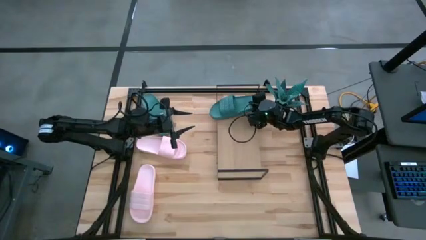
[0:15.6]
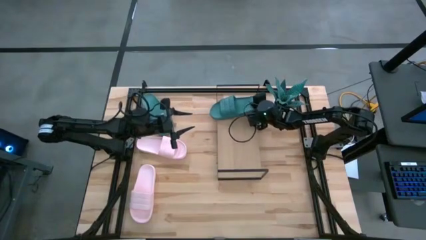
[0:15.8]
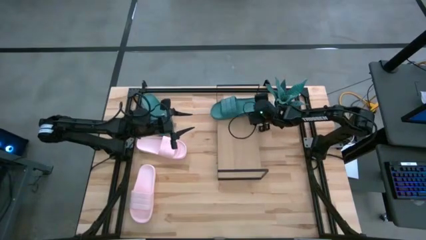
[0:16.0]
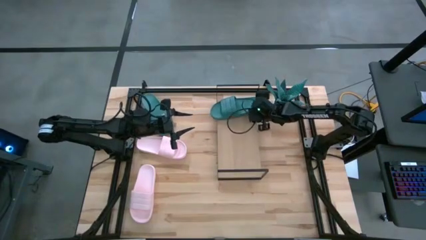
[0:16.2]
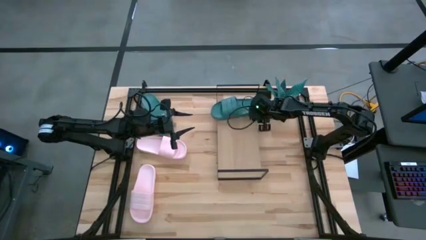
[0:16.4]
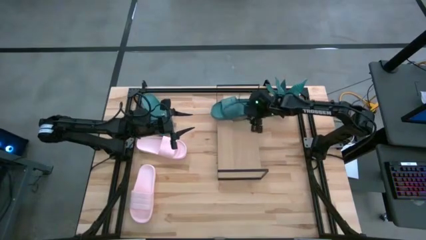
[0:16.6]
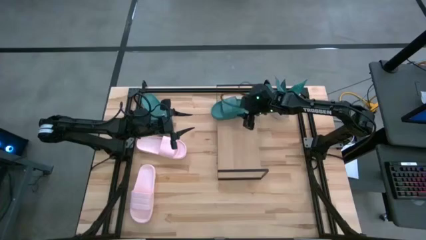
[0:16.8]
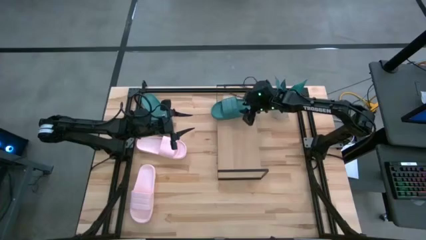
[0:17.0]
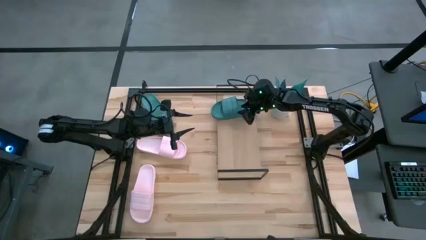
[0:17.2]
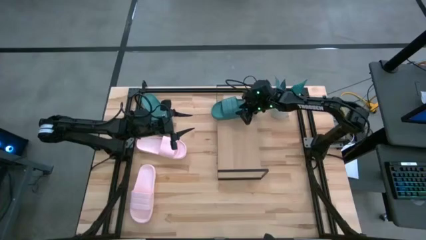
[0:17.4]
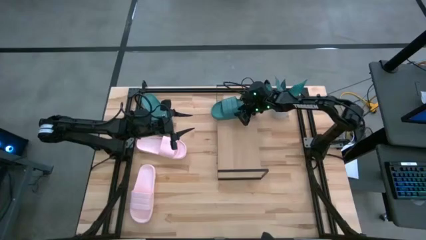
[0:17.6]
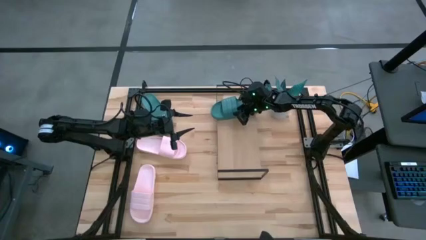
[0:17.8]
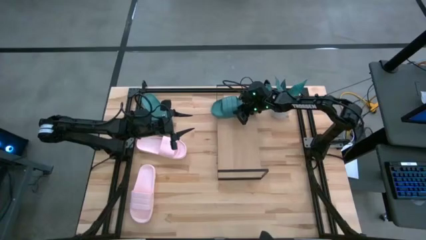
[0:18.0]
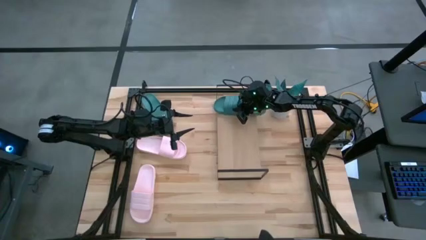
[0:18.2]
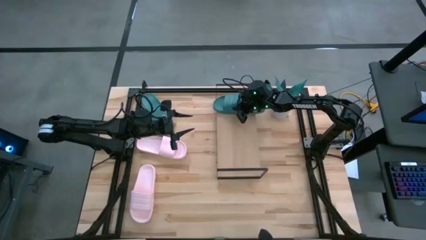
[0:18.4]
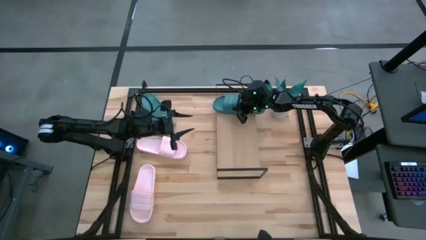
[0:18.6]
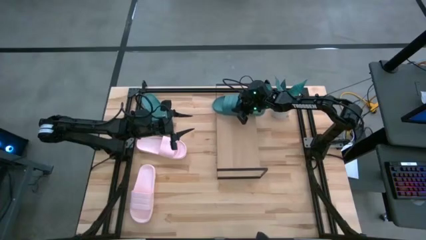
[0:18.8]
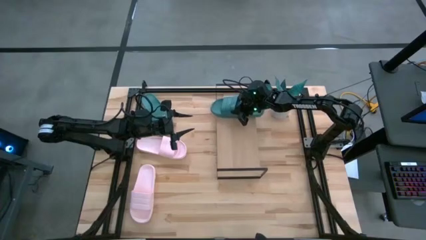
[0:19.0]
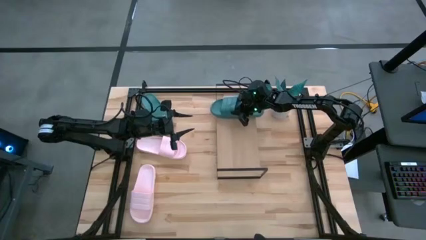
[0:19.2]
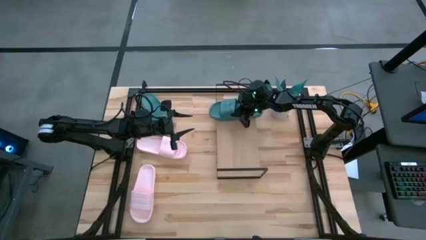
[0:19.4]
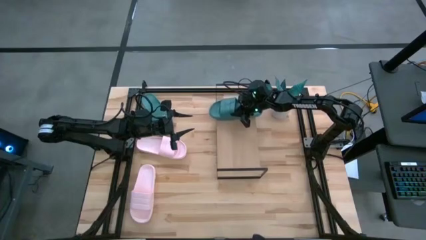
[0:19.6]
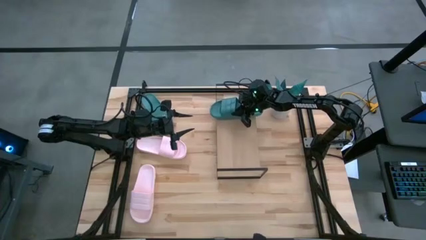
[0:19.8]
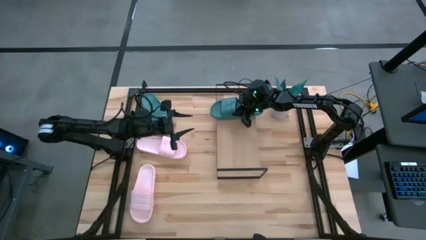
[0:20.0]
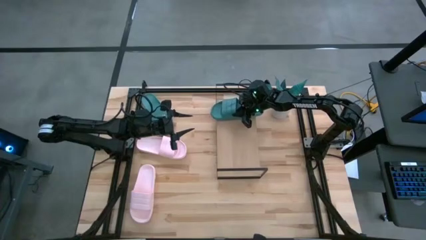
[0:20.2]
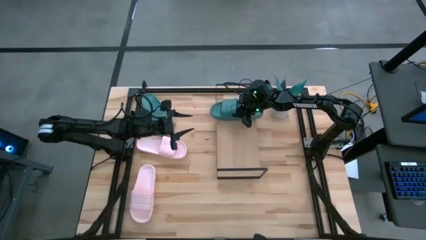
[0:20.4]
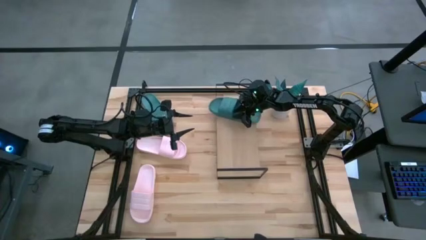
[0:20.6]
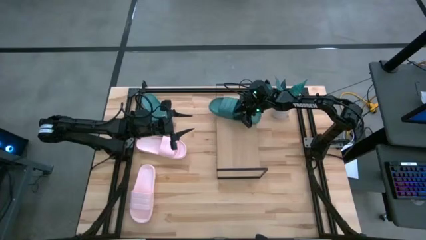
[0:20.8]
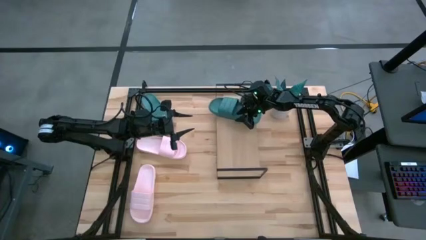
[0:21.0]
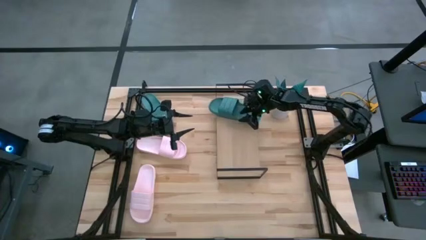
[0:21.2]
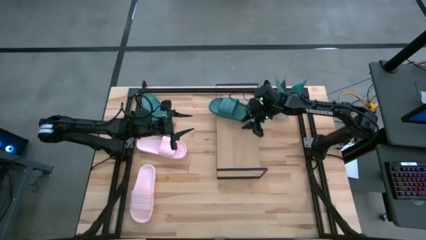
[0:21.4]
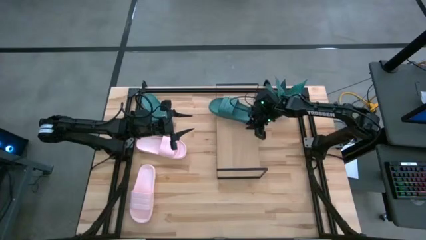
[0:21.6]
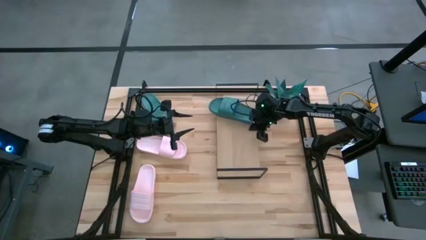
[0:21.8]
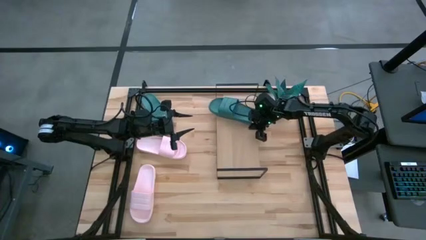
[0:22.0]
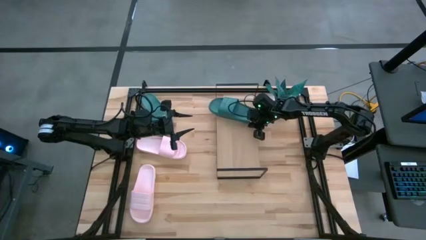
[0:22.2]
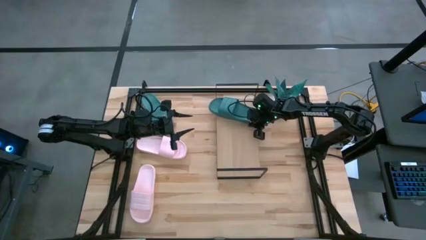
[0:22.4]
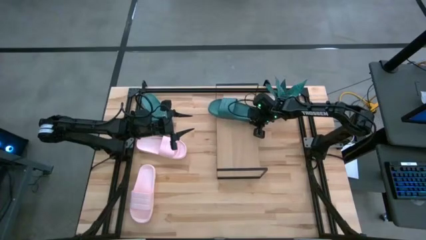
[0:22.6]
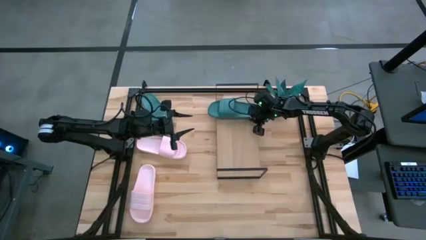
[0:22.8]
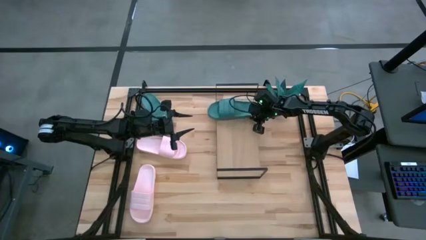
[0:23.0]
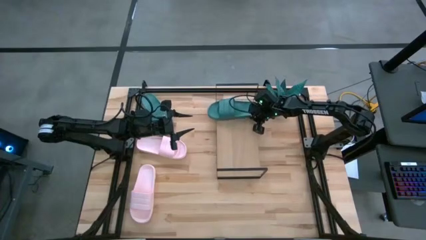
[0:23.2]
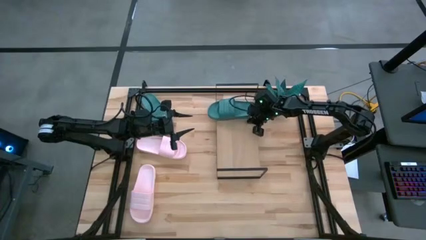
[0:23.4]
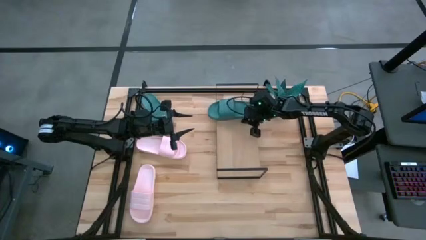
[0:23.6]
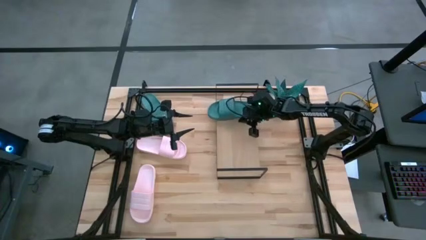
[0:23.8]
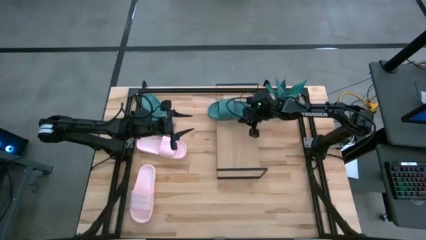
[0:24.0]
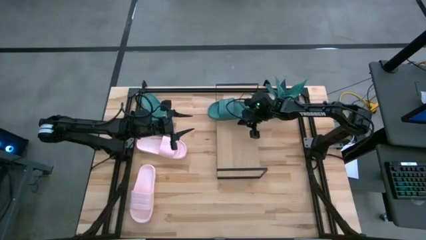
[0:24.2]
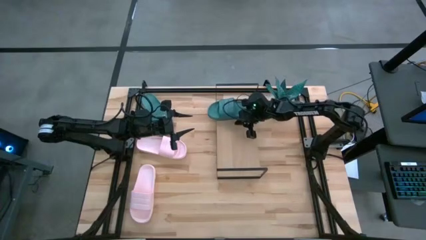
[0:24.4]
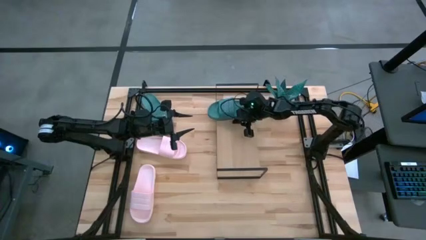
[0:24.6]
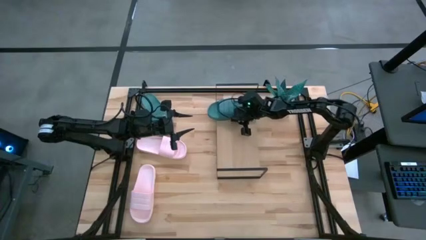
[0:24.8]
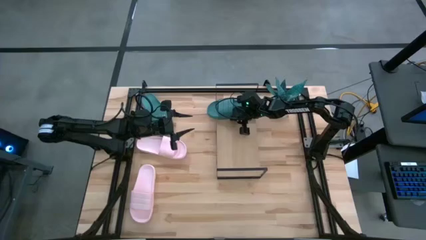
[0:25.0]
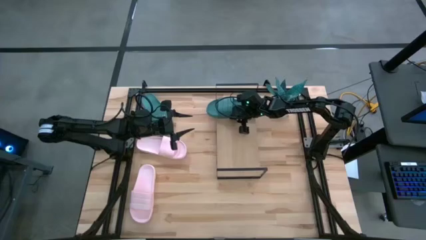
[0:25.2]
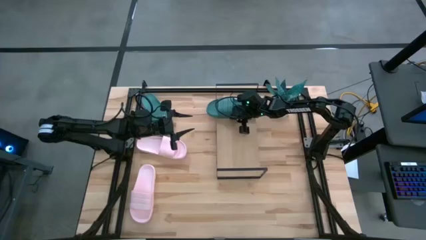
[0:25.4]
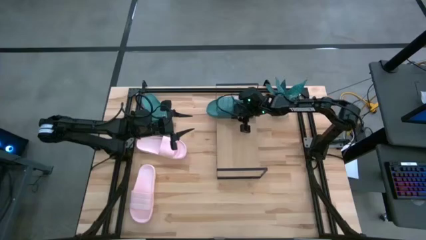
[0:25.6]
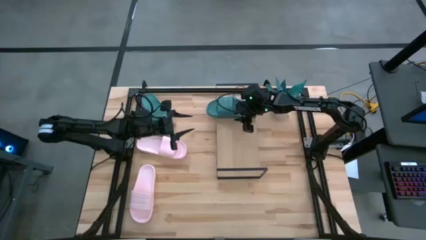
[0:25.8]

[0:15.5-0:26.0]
Task: Pick and place slides into the shelf
Put the right blue slide on the shelf

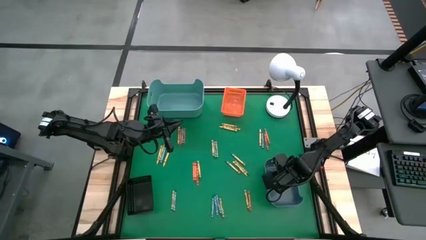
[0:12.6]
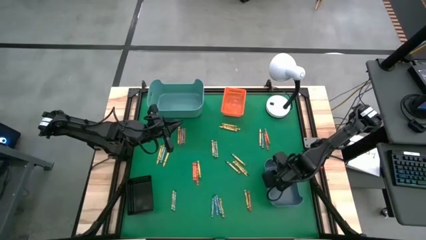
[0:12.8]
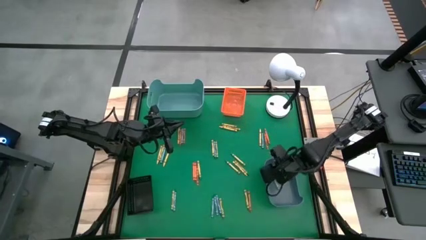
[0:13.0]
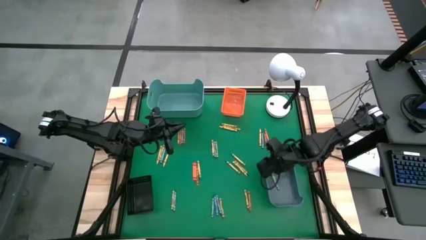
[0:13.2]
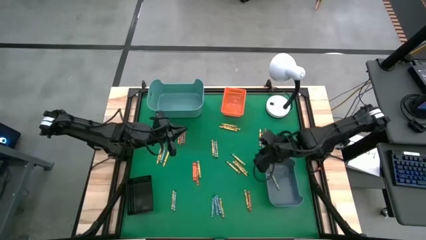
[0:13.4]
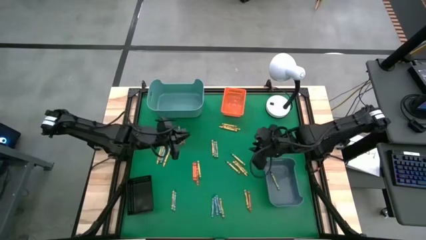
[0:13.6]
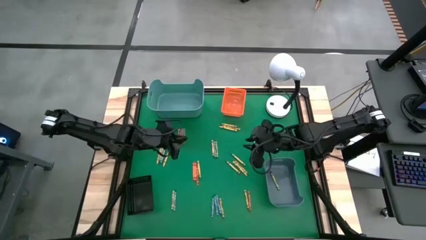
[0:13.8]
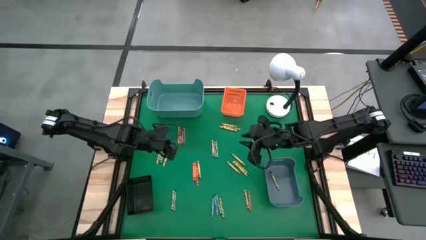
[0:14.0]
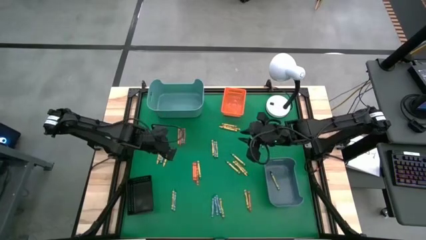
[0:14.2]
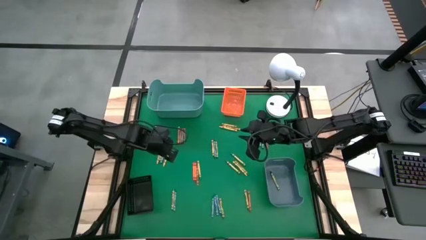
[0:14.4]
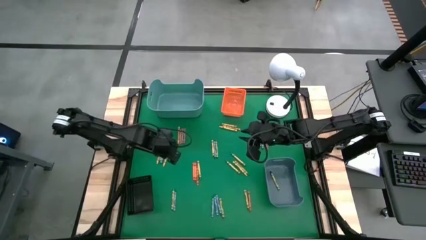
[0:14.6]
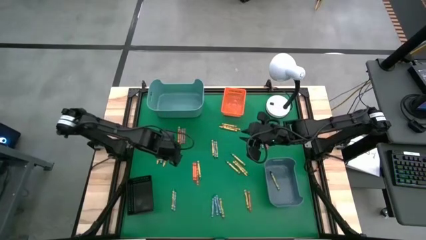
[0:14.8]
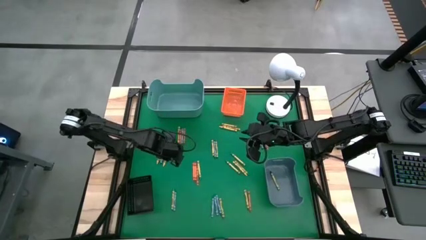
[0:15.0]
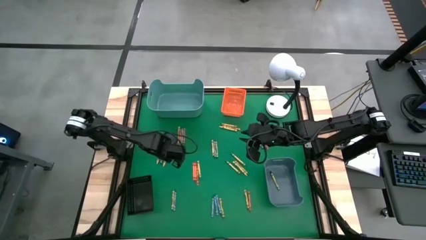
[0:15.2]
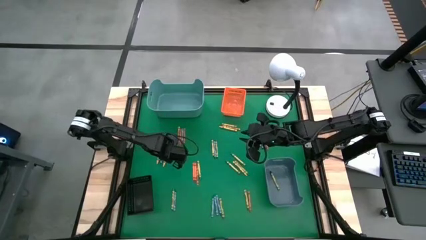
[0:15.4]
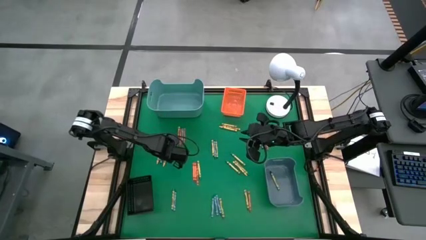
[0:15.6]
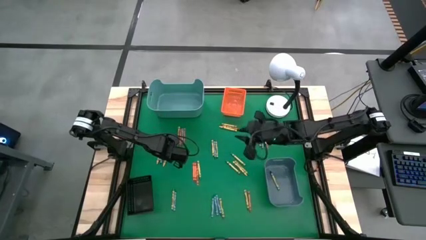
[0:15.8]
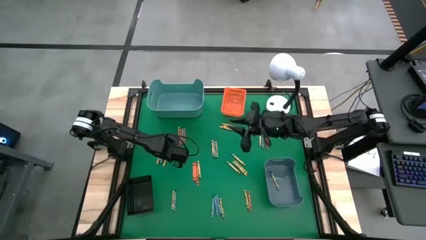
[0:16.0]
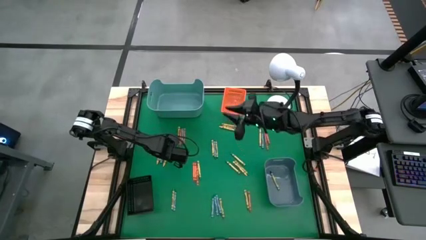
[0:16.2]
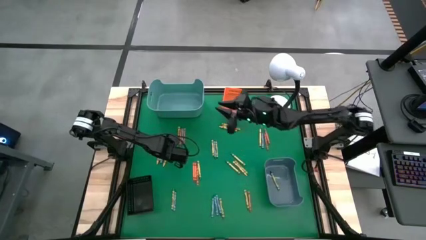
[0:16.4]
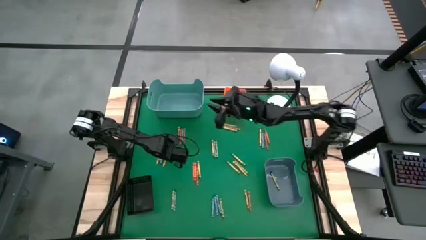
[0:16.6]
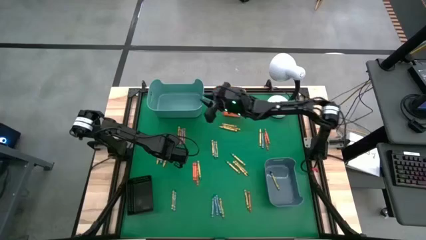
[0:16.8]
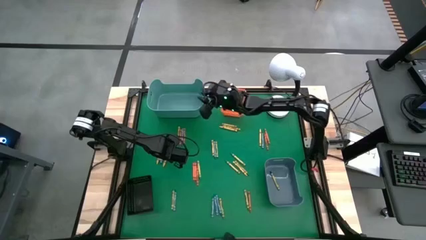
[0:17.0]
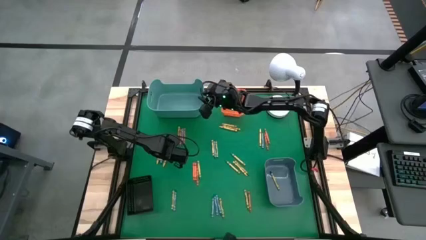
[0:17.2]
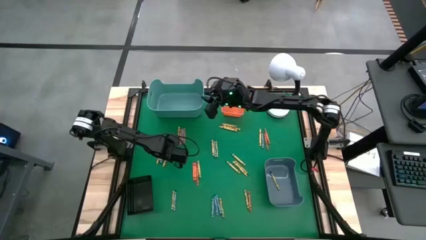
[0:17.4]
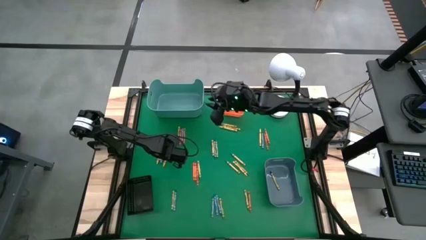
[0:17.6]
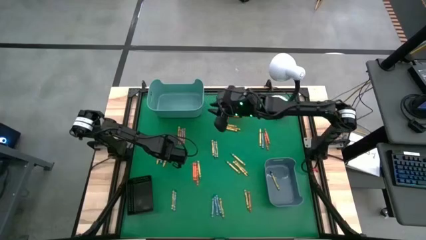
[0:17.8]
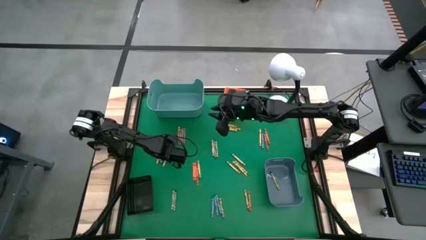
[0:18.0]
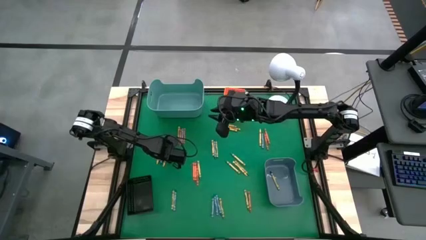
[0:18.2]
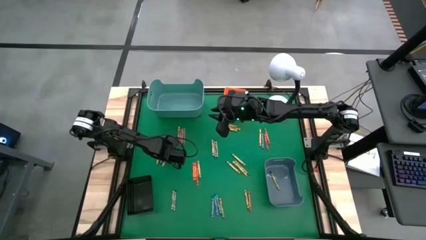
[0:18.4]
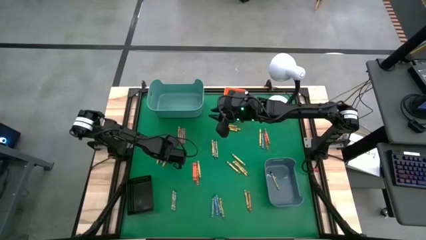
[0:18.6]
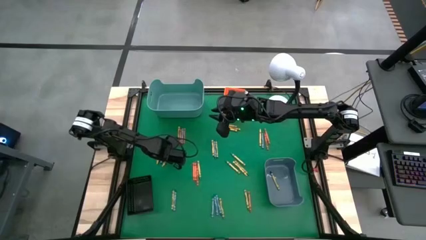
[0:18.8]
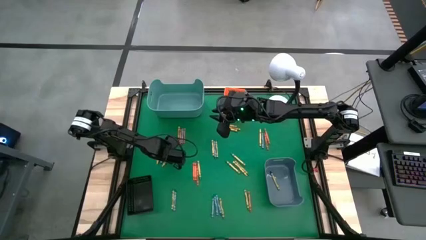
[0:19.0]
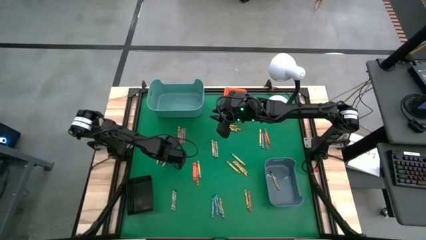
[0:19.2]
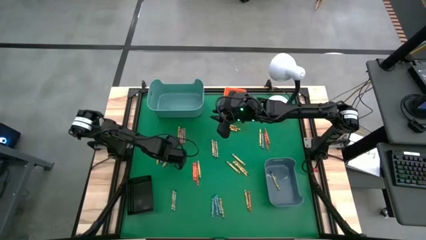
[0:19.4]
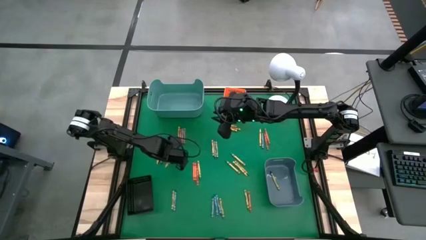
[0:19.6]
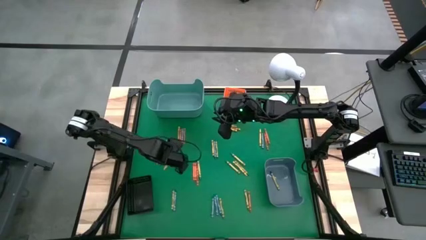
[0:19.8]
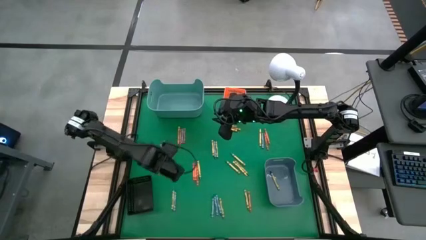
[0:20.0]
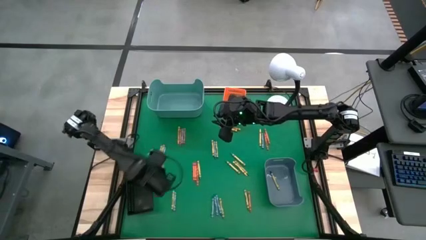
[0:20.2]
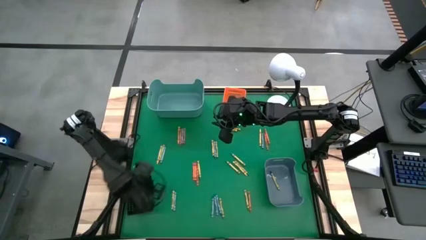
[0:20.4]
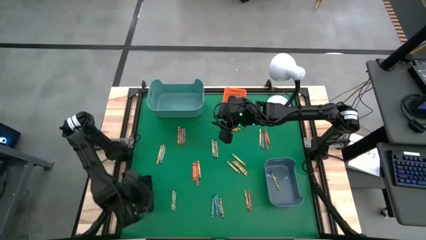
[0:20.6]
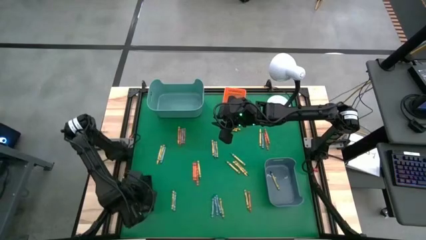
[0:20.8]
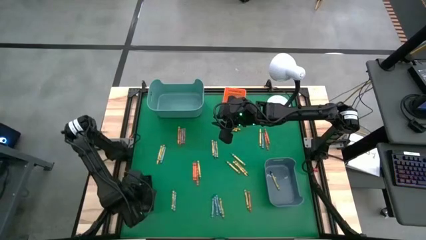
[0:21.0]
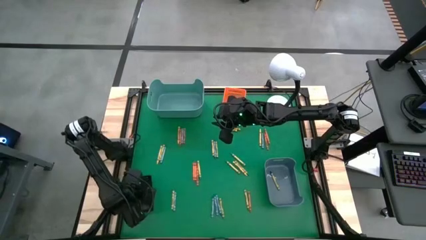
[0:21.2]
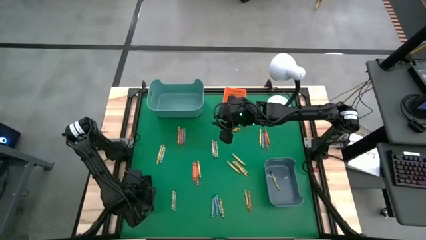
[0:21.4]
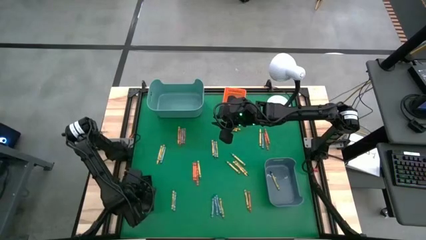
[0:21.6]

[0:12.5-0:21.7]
Task: Sort crayons
Put the yellow crayon into the black bin
